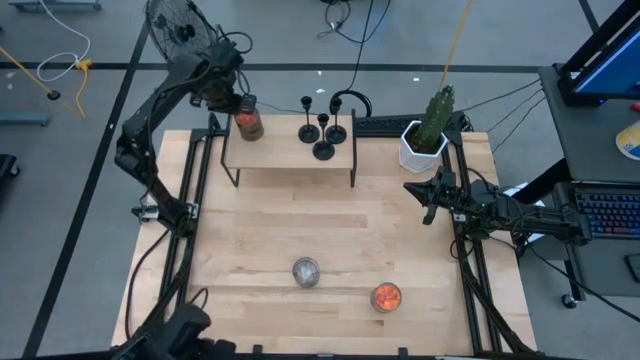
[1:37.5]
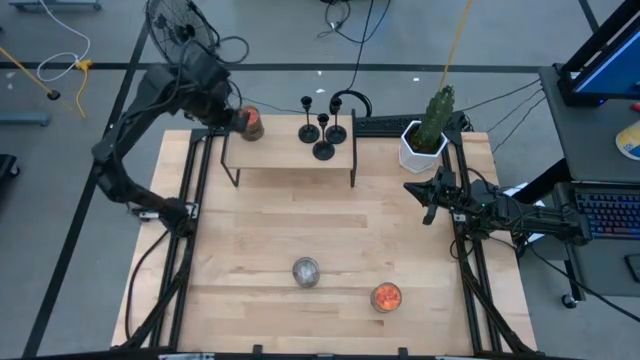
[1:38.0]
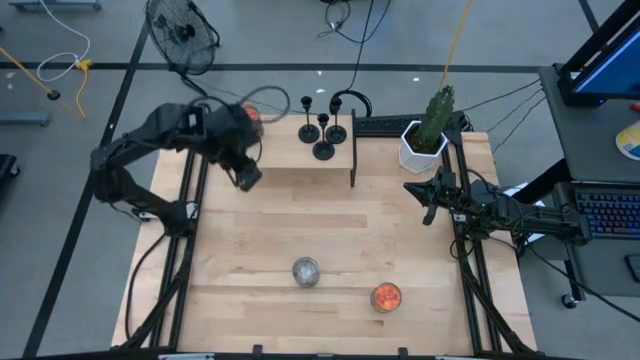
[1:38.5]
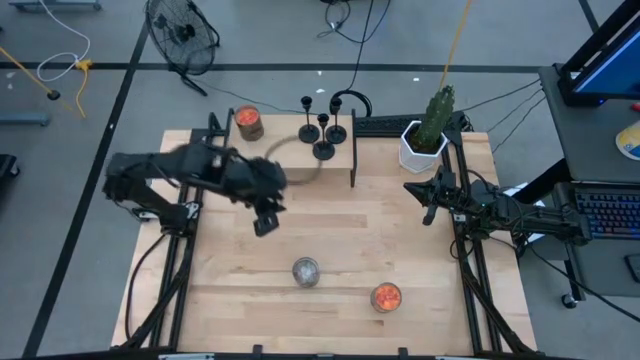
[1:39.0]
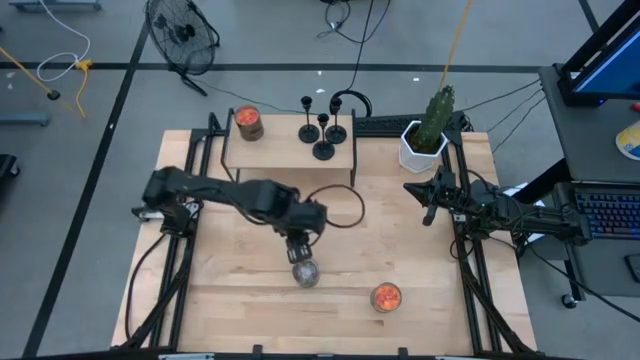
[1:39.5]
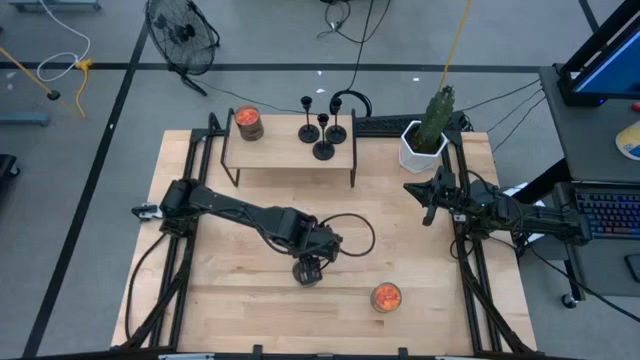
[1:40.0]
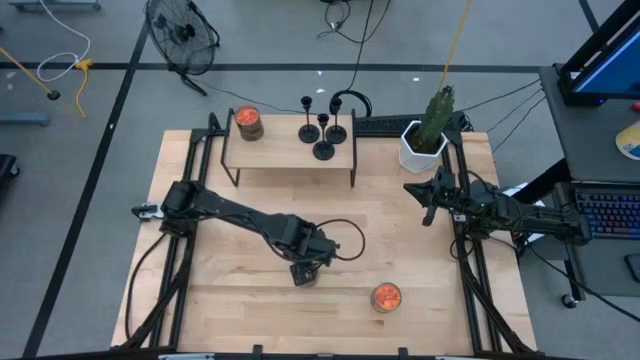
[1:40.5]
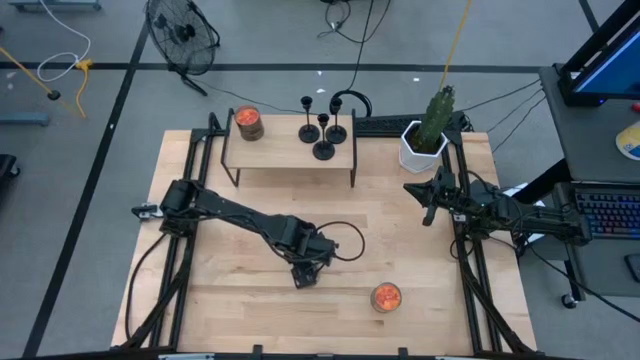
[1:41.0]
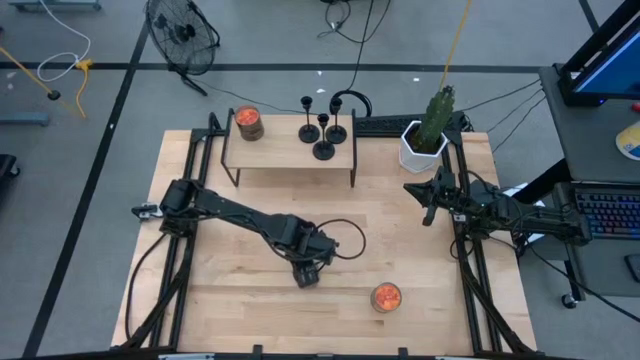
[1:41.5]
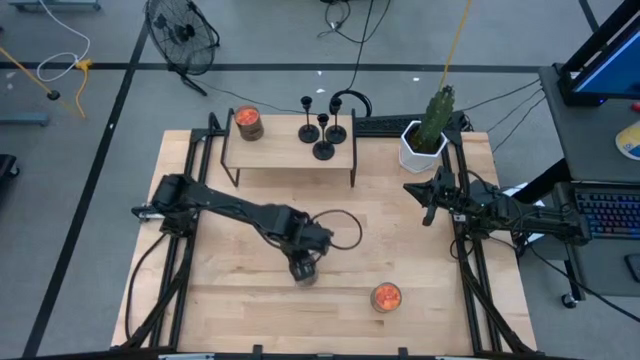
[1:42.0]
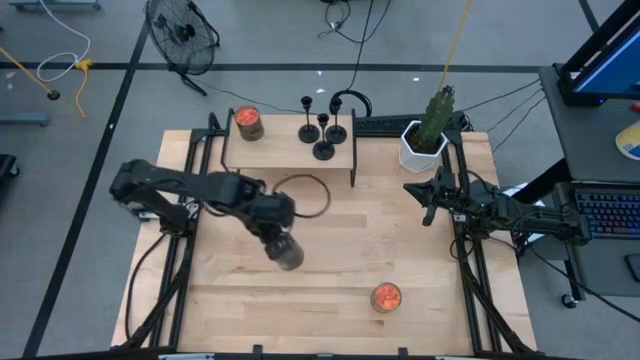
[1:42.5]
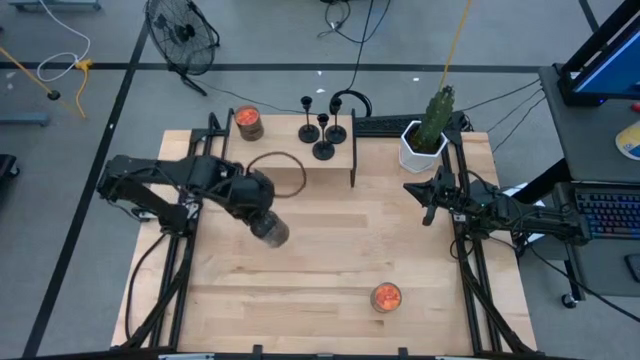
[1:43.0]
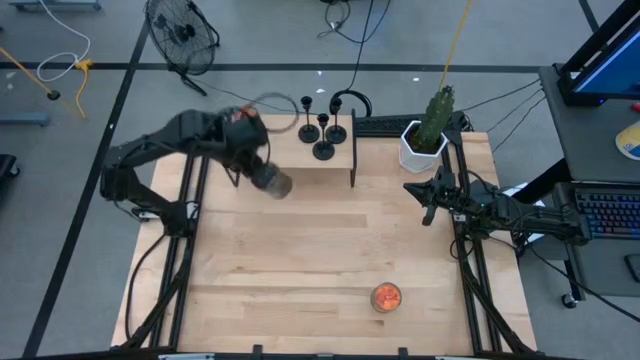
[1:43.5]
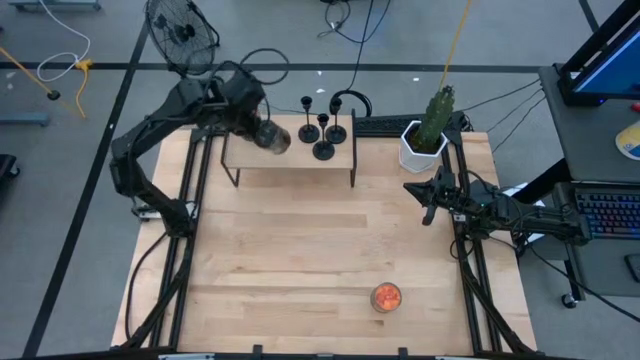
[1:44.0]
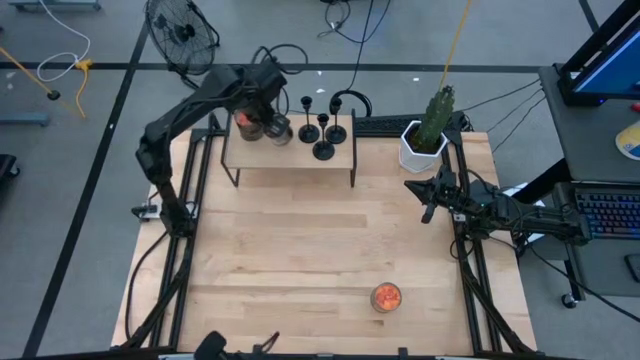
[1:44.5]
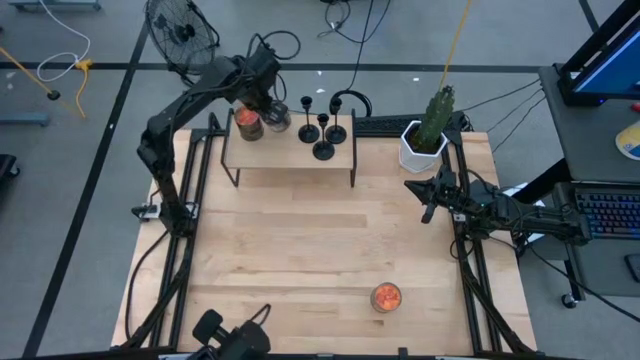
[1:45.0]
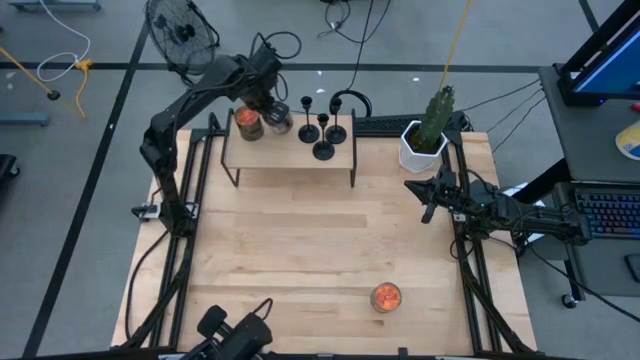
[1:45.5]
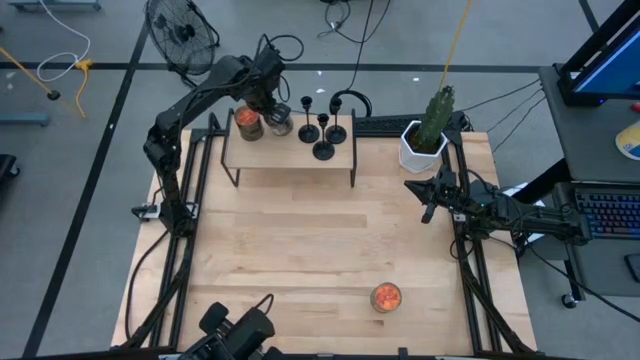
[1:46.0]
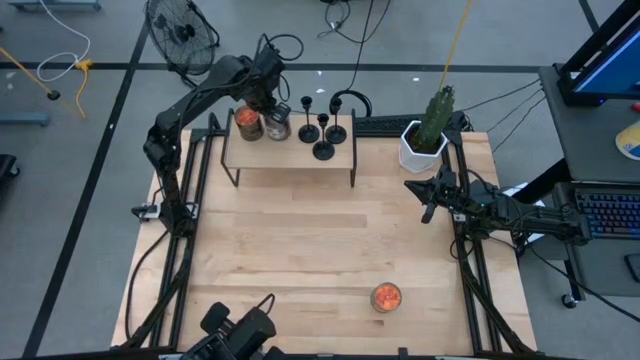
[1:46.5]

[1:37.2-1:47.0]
Task: Pick & Place candle stick holders
Put the white scented candle on the shelf

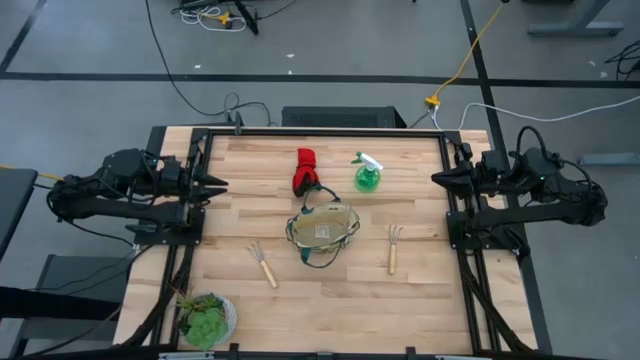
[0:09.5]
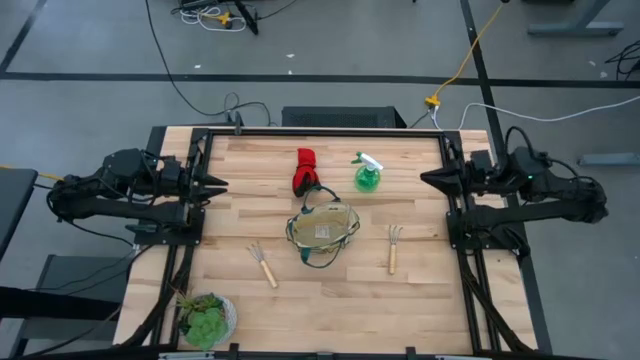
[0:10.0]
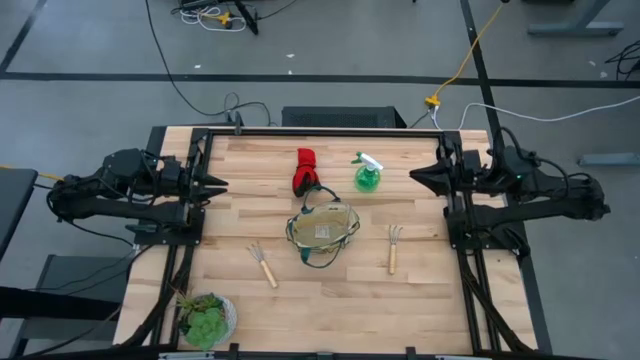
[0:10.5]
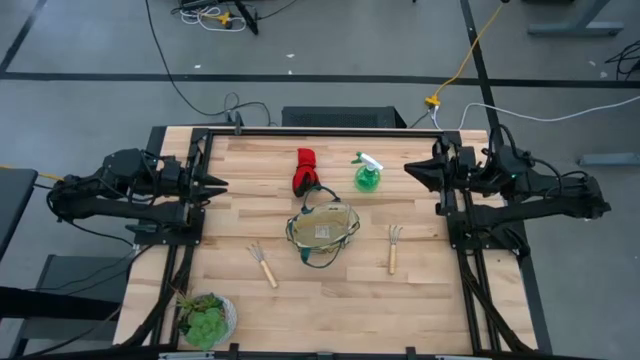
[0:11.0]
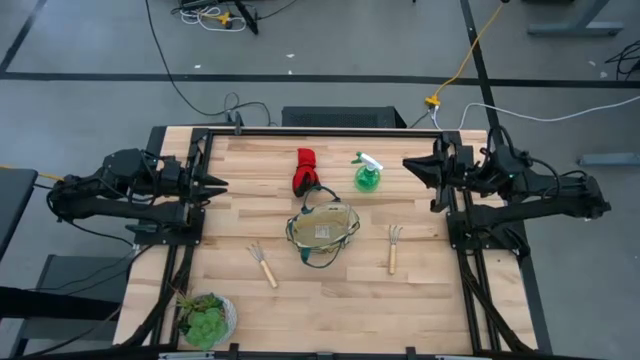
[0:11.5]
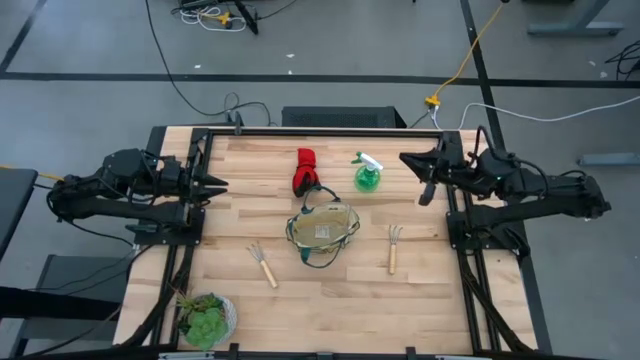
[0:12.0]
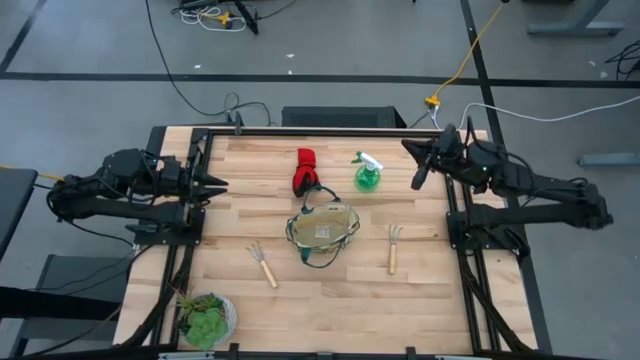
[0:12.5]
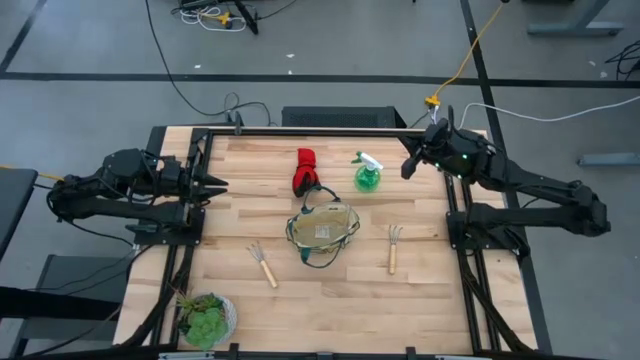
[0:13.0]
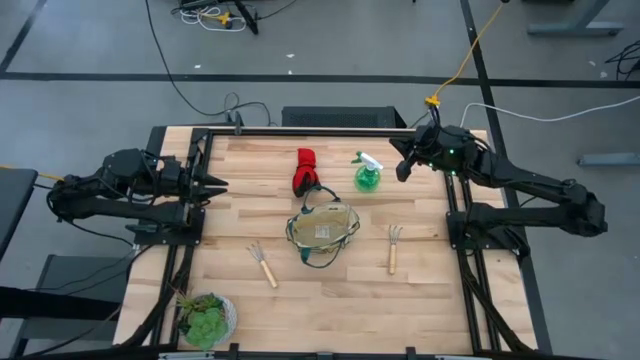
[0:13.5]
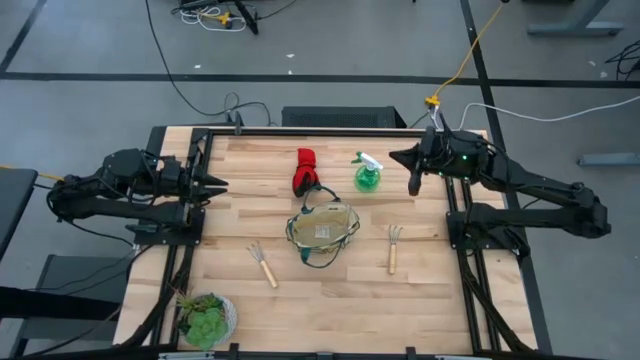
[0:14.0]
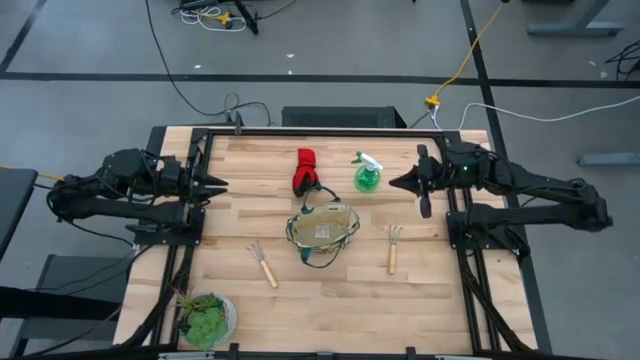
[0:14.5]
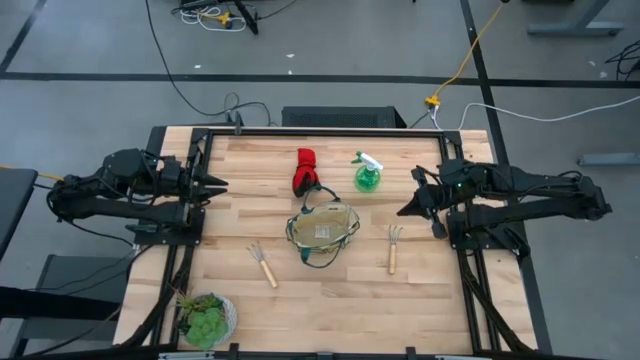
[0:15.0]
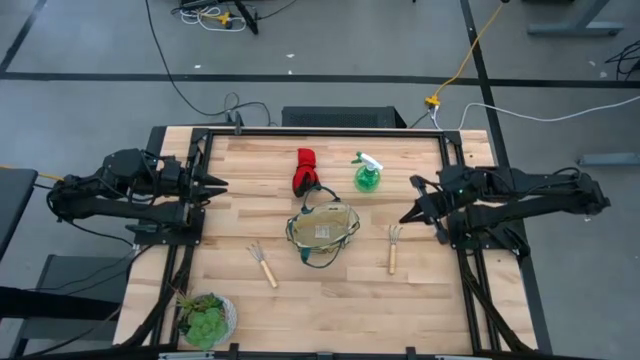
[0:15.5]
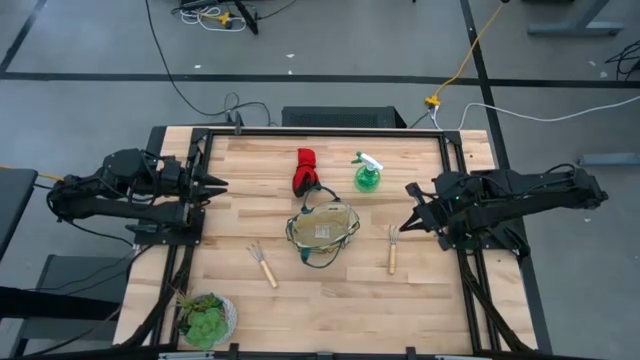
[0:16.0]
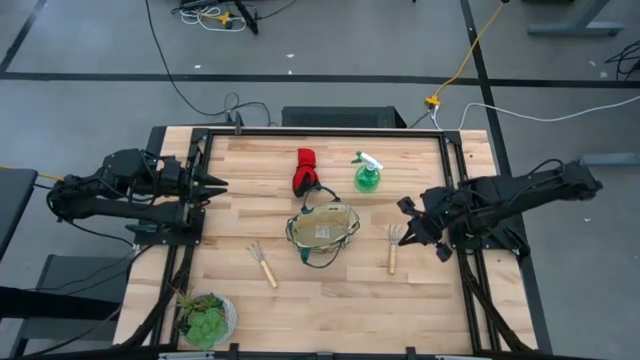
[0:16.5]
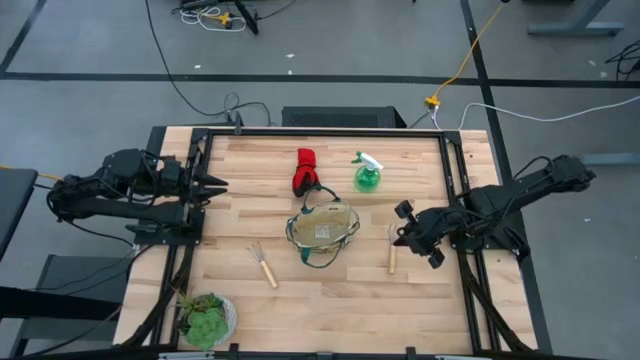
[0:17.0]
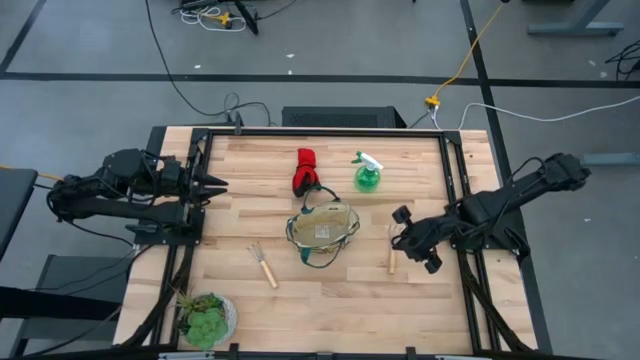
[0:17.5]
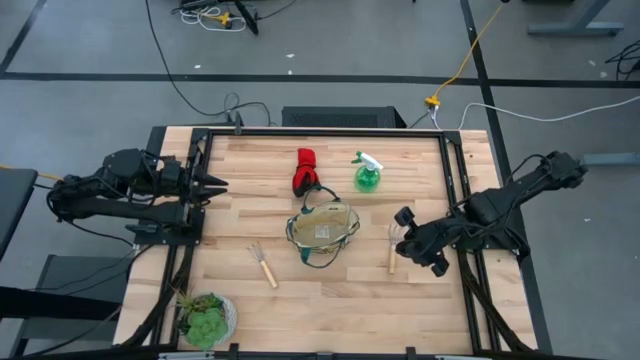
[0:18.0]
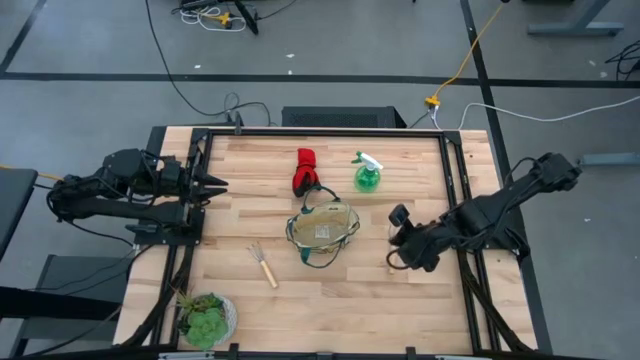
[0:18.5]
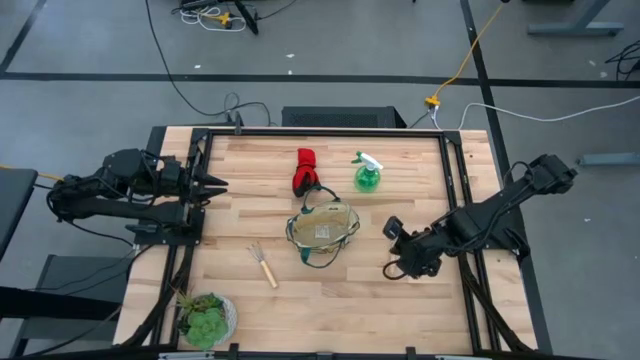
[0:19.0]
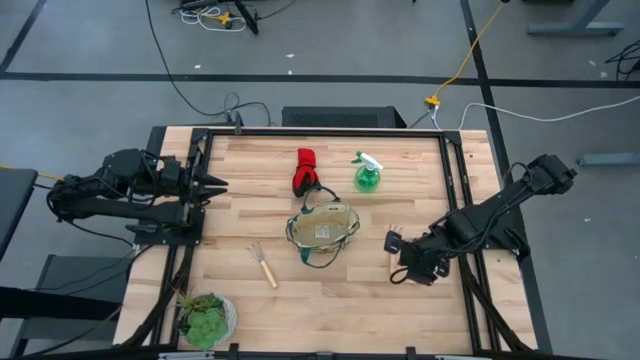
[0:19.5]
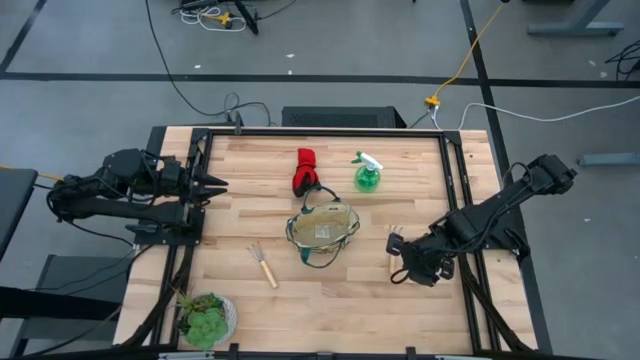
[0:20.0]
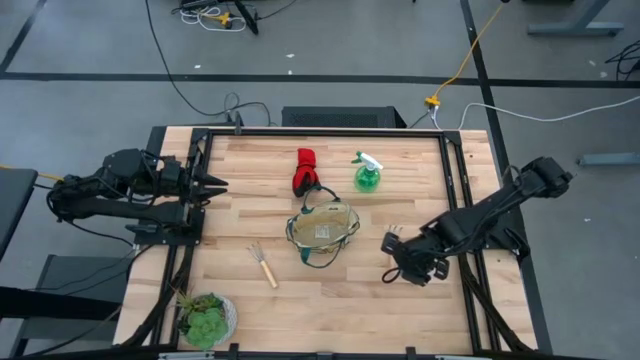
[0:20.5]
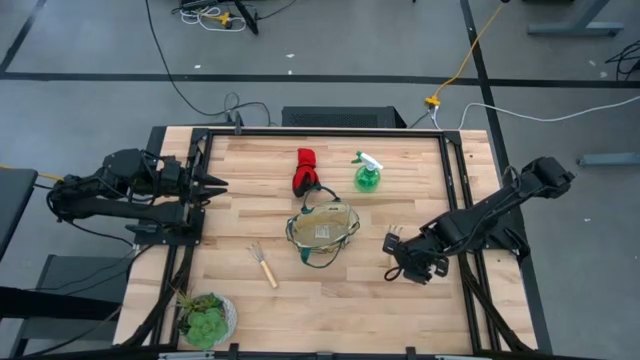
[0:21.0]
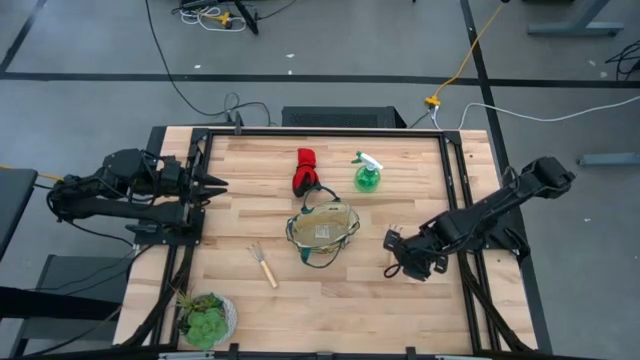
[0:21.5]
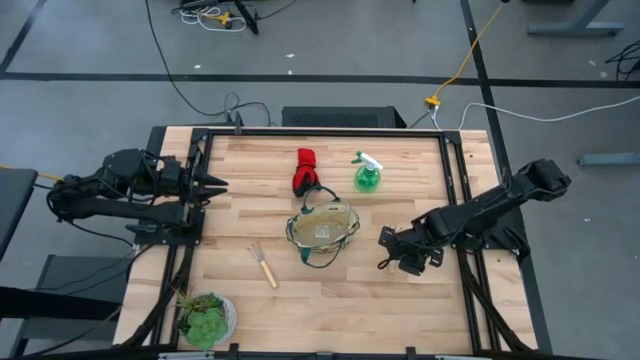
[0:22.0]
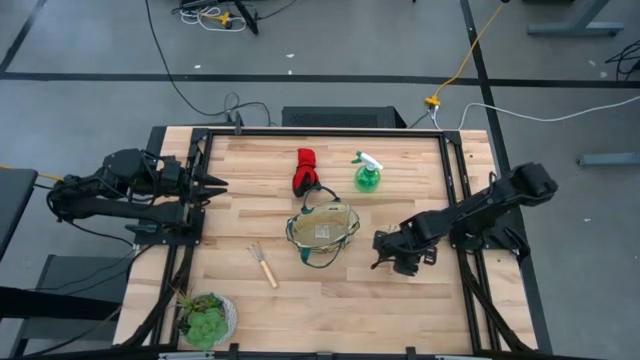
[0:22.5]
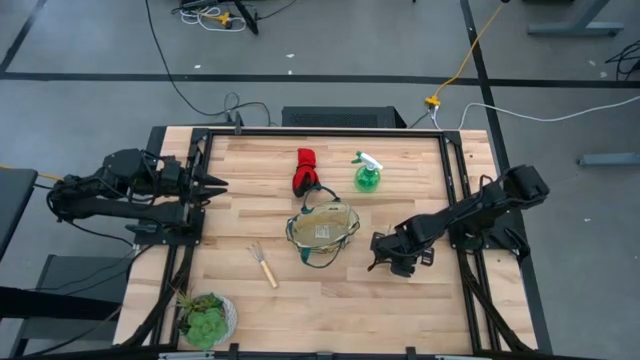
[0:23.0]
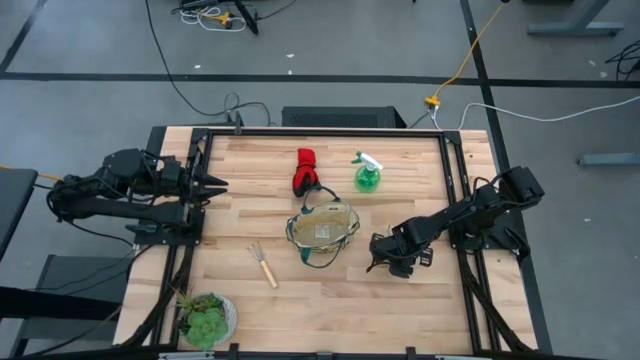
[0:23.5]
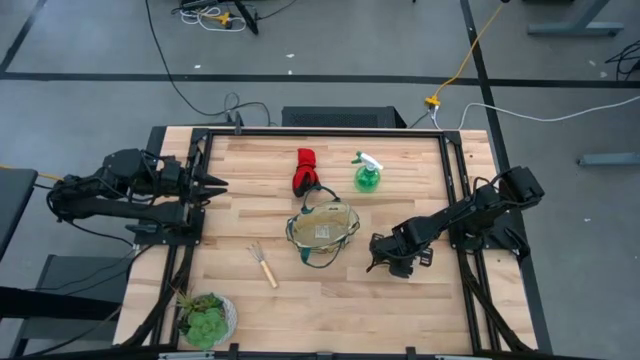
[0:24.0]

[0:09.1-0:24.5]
Task: Pick & Place Garden tools in Gardening bag
Put the light brown trowel into the light brown and green gardening bag
